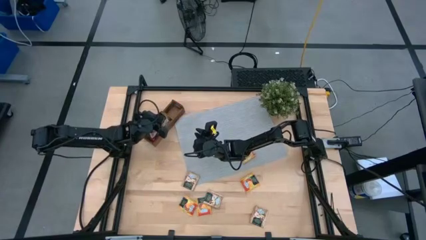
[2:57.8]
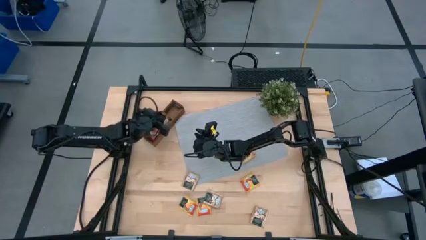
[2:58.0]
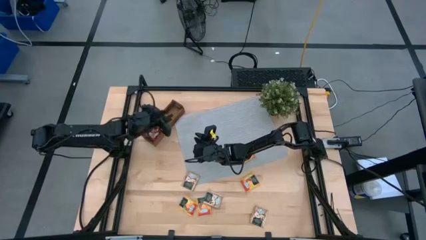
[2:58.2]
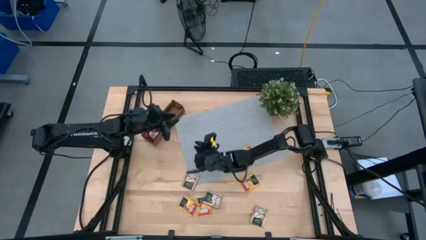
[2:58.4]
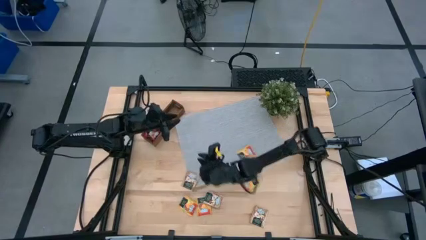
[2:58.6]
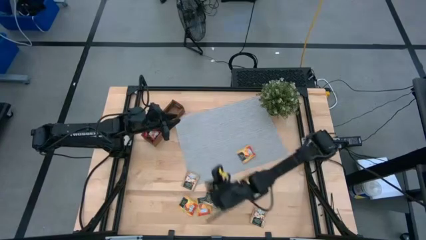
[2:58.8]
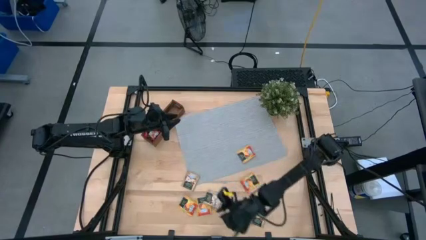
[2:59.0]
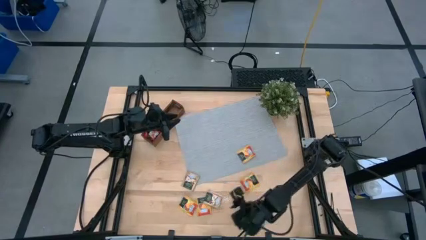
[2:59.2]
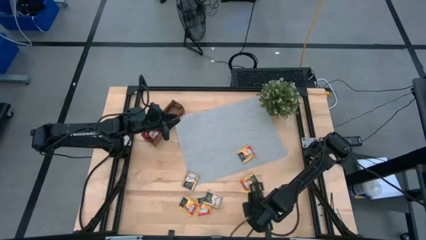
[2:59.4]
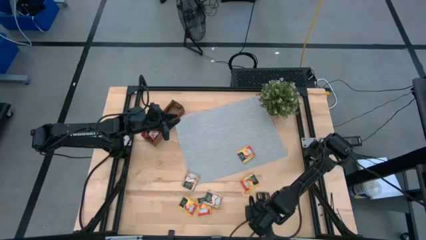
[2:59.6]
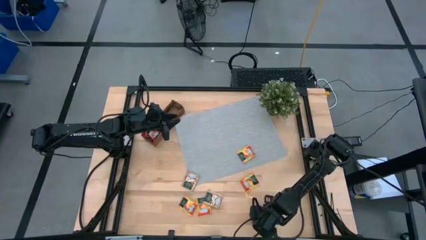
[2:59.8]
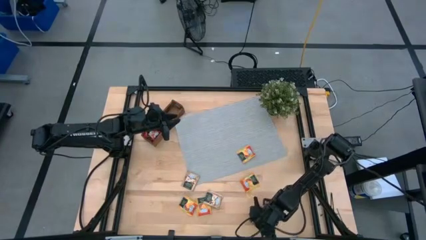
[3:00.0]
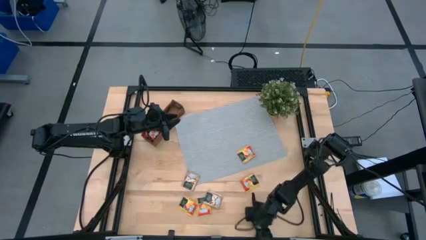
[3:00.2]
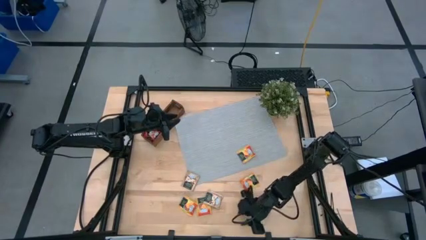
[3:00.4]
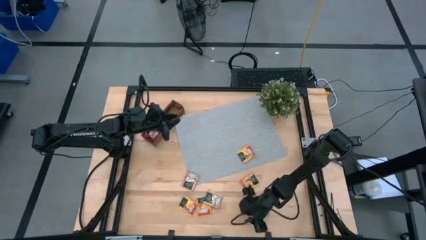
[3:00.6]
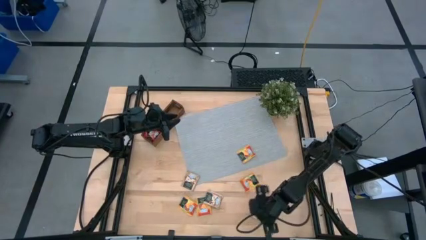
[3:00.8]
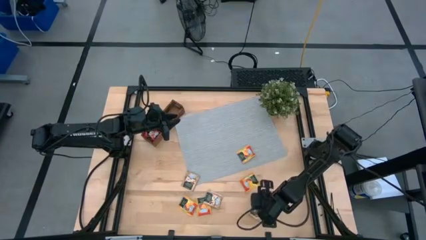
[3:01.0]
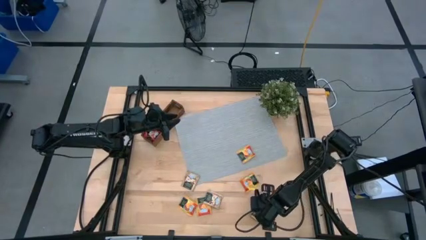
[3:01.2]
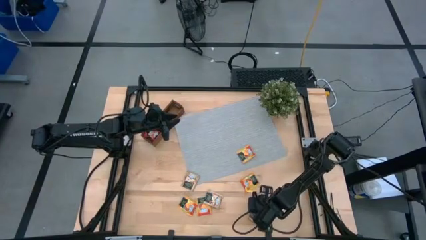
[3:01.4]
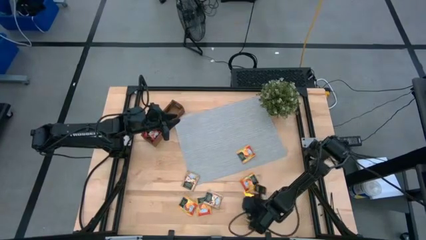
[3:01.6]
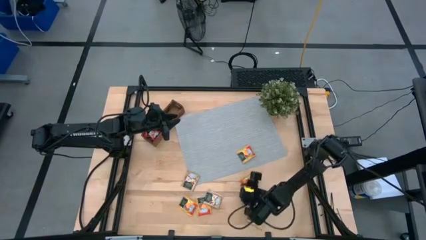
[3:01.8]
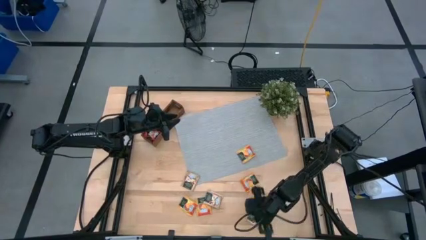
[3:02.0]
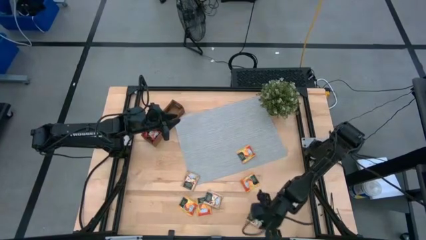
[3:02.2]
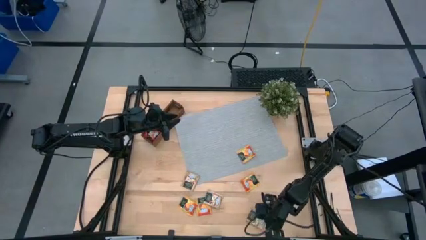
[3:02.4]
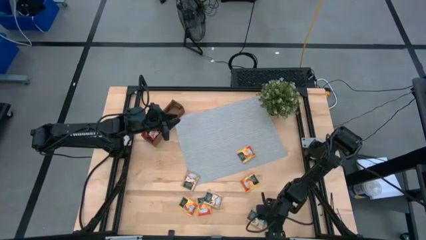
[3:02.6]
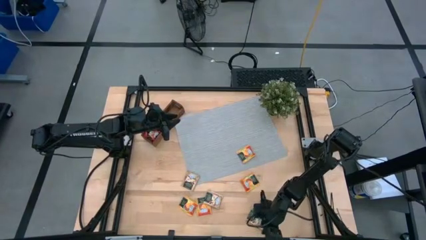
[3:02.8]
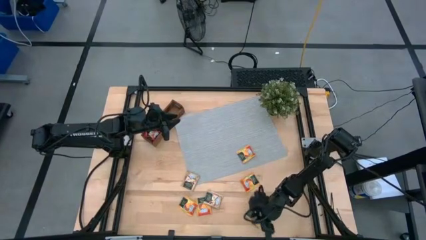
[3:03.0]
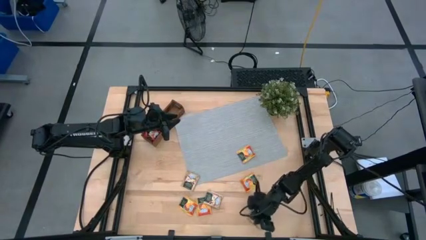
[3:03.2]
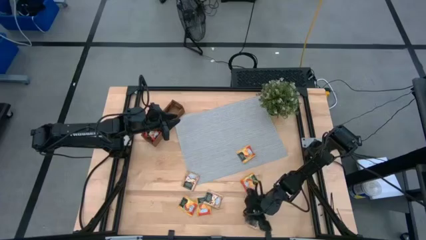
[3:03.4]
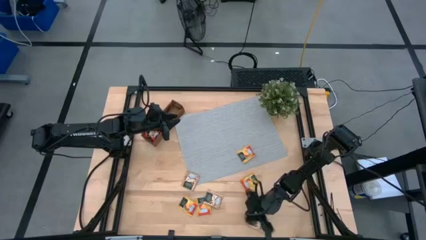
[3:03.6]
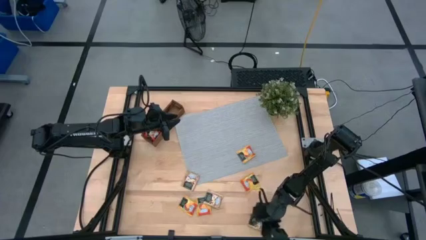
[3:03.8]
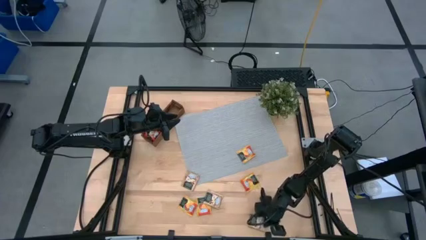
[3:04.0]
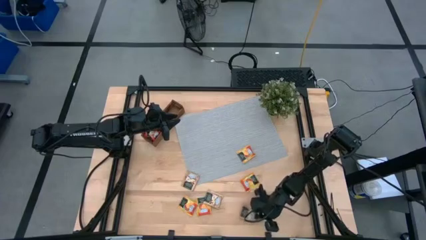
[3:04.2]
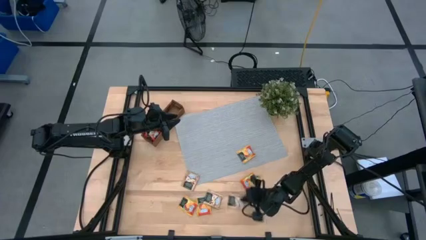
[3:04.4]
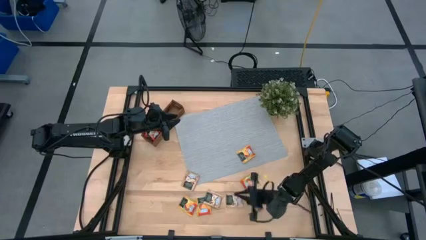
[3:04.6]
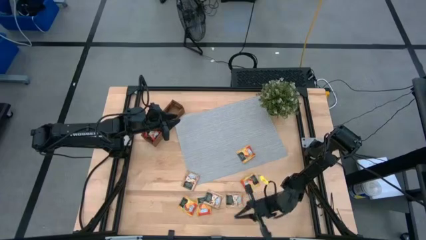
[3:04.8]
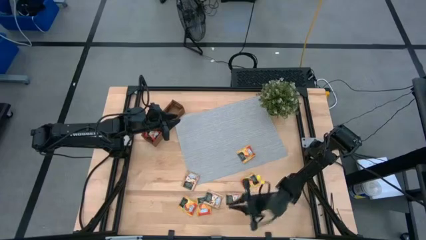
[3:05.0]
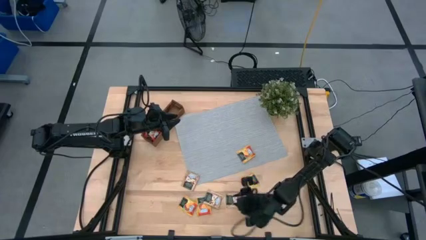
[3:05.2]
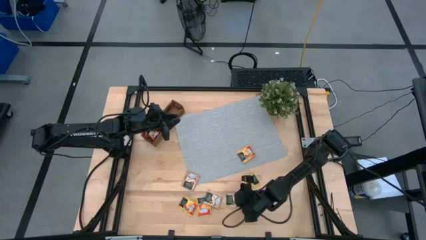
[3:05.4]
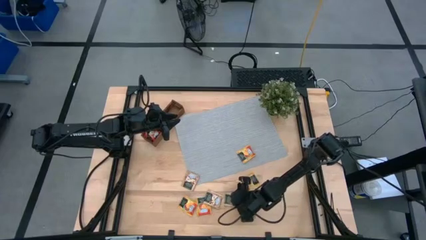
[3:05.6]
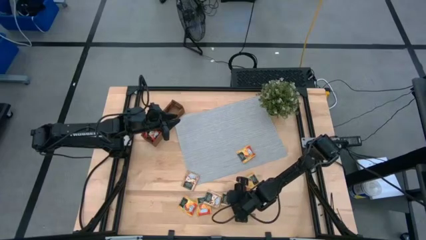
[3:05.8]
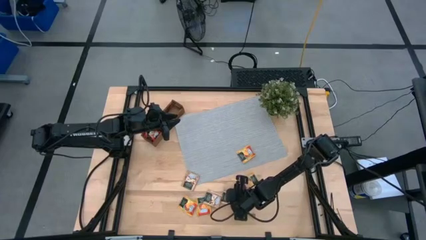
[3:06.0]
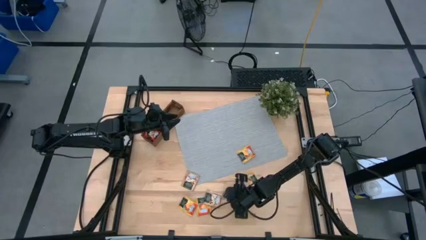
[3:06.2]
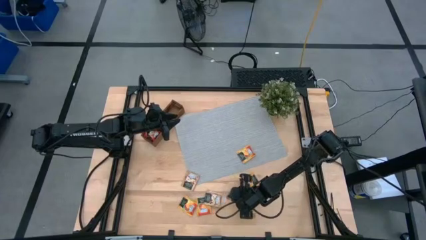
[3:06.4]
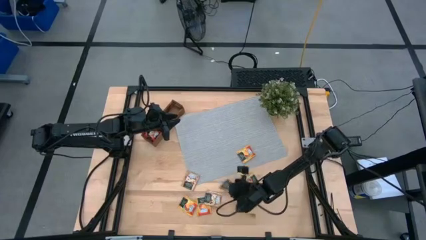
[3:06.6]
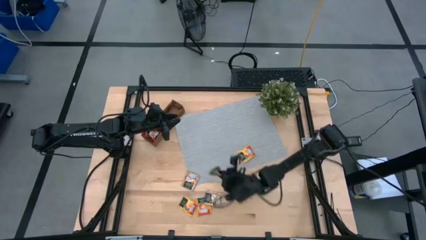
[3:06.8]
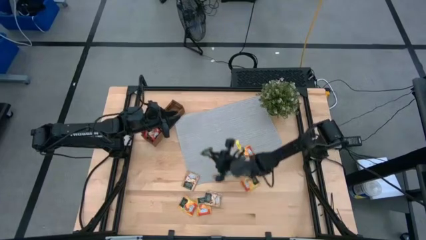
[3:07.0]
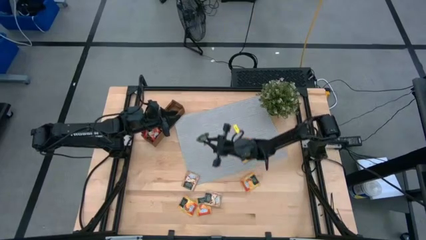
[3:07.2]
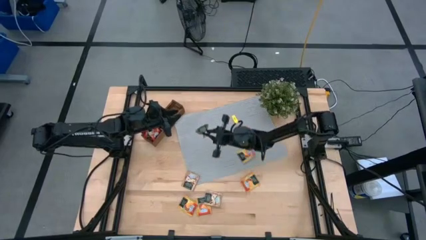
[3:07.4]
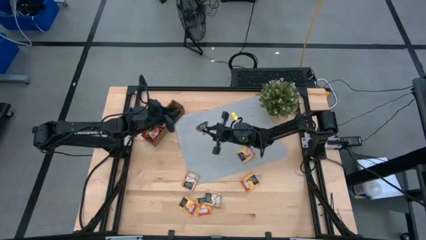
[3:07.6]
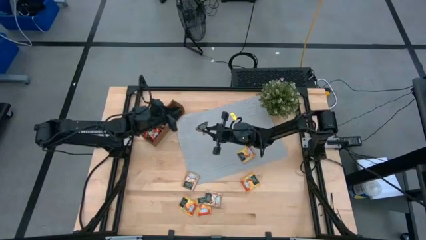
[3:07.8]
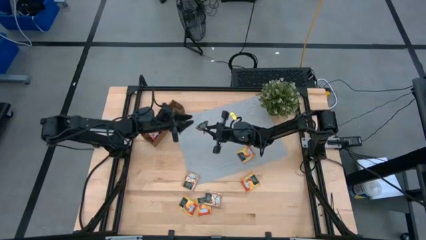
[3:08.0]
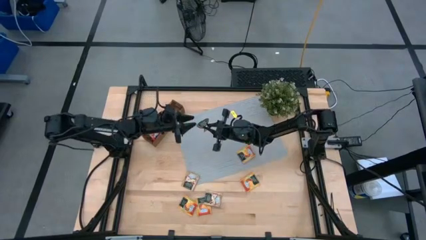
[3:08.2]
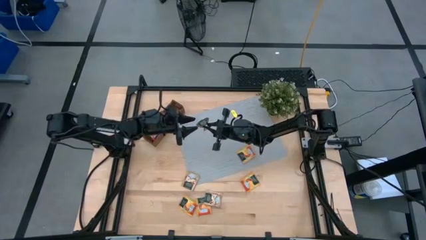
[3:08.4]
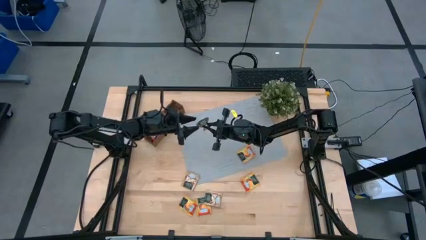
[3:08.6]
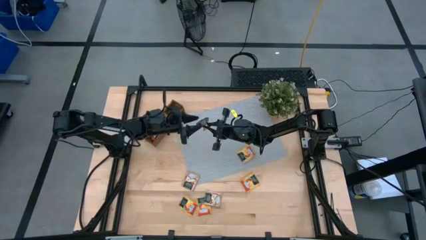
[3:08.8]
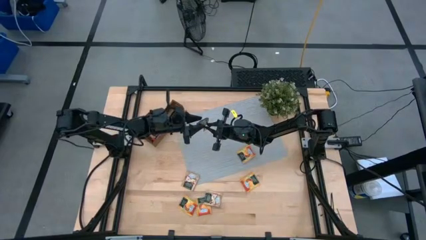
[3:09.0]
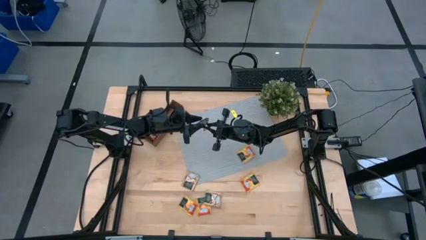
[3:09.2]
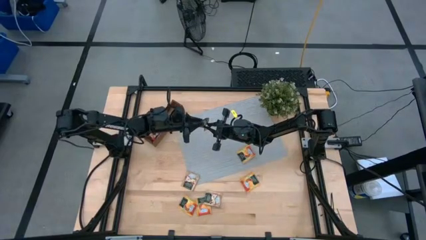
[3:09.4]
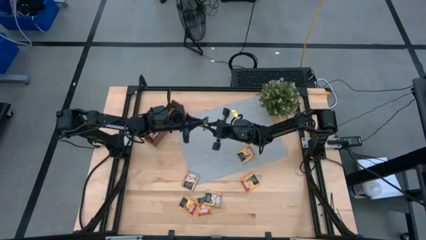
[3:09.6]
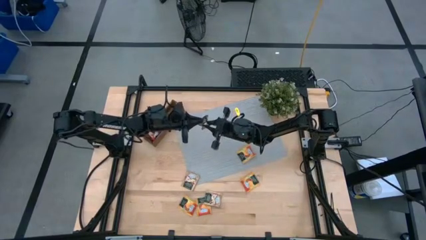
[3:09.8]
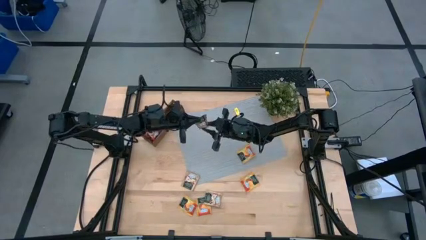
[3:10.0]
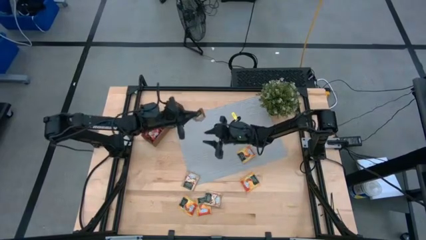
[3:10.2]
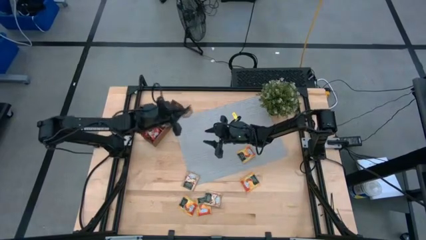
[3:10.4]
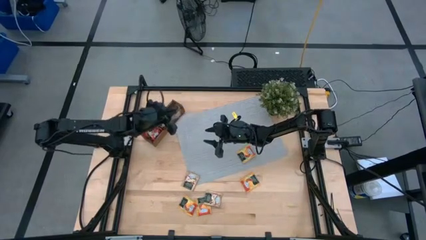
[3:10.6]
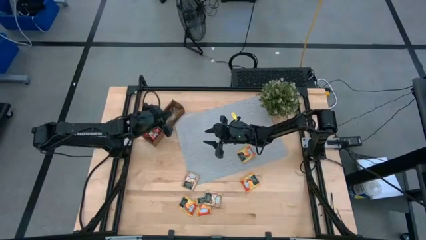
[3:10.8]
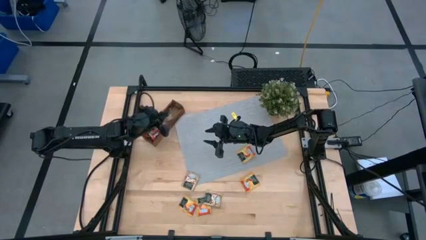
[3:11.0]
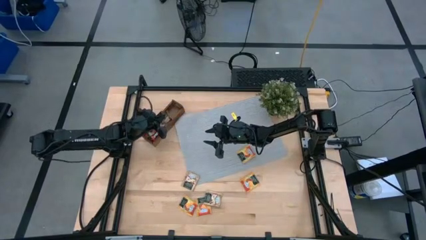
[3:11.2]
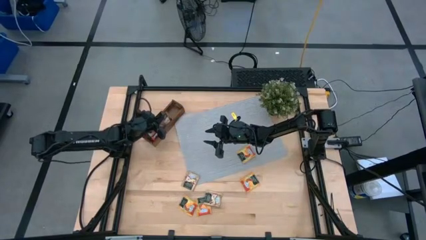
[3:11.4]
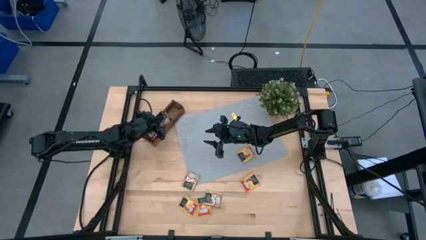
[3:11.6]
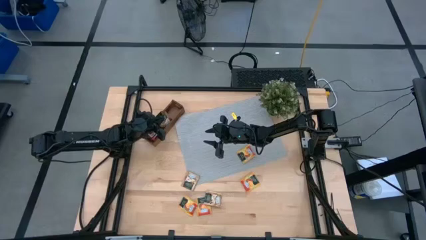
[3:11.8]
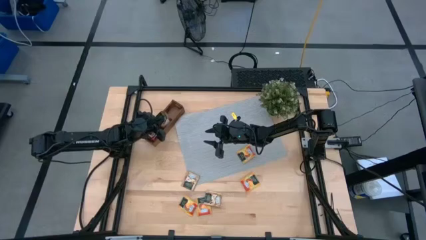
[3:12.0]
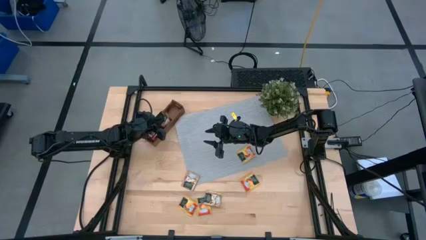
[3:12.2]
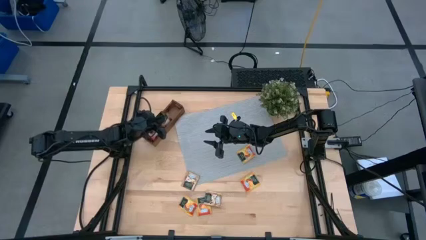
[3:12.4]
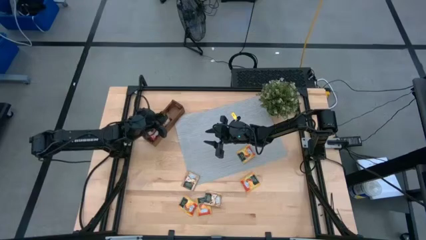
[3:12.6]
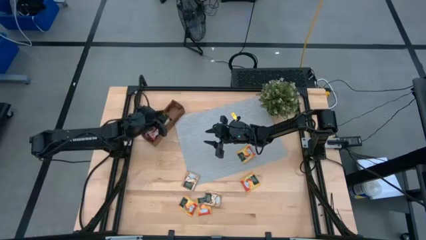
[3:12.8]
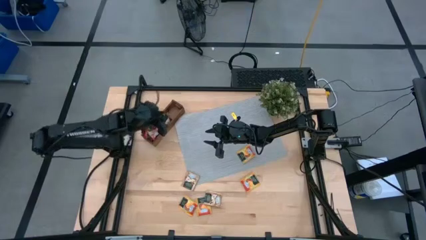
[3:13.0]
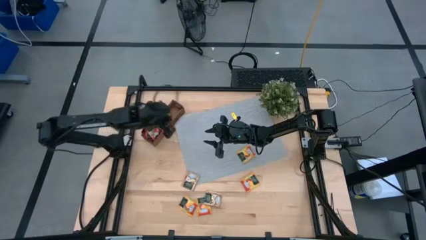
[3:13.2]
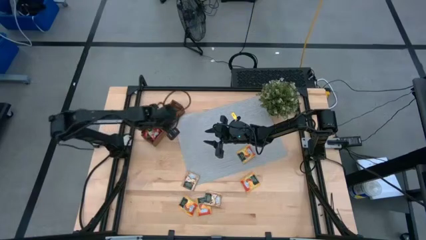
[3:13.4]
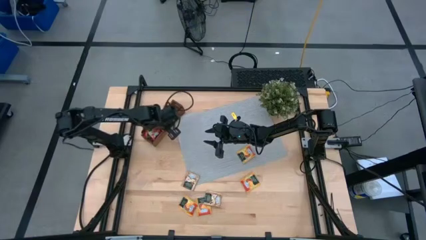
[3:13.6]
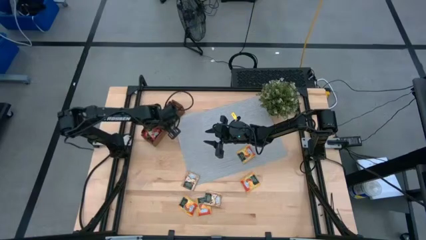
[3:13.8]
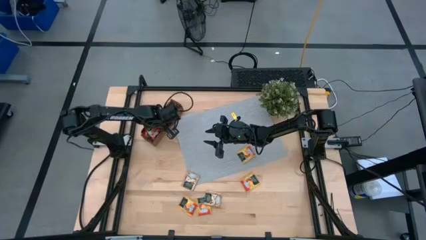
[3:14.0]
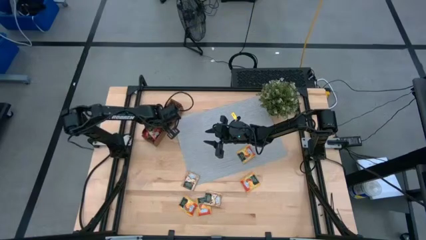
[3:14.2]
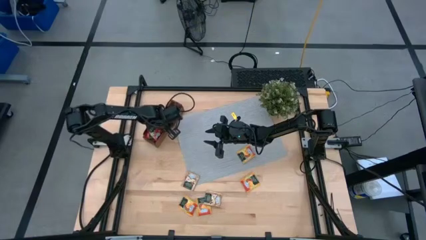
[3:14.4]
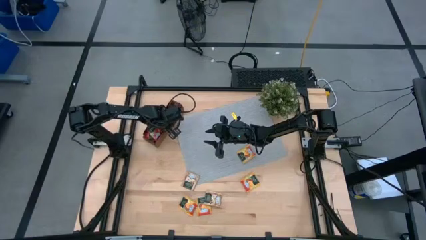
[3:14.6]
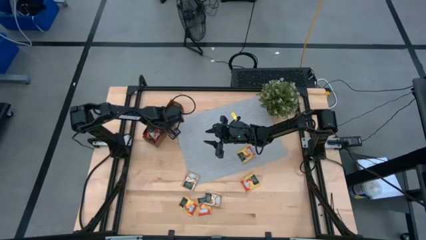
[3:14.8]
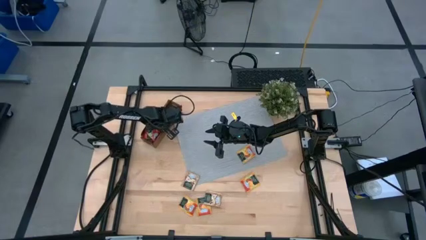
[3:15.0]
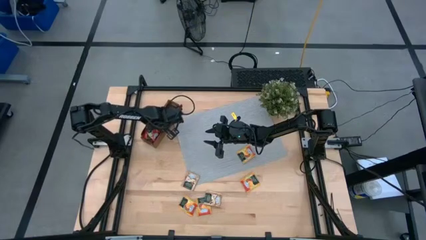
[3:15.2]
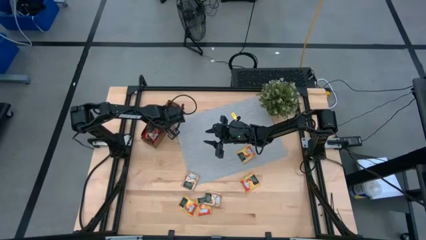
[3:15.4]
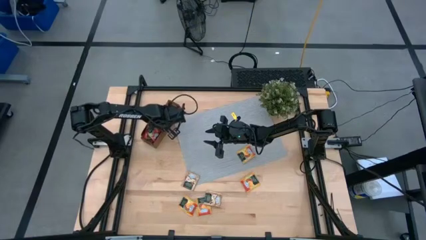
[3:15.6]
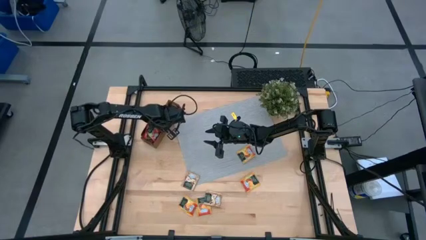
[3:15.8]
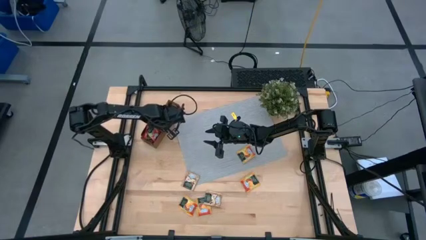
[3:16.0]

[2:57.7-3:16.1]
Task: Pick & Place Tea
Put the brown tea bag into the middle section of the wooden organizer
